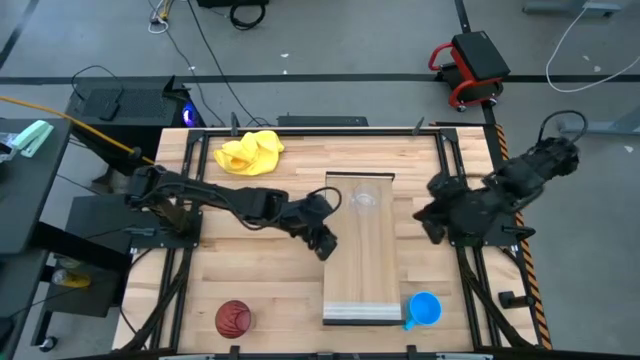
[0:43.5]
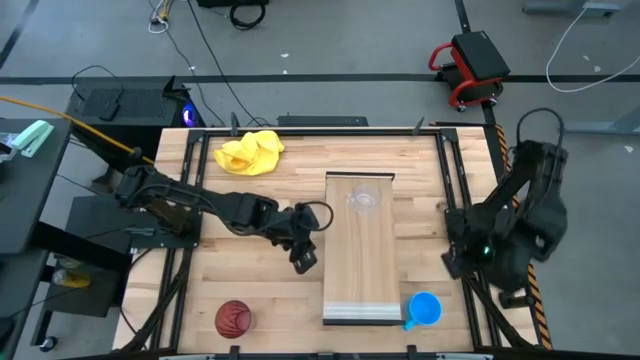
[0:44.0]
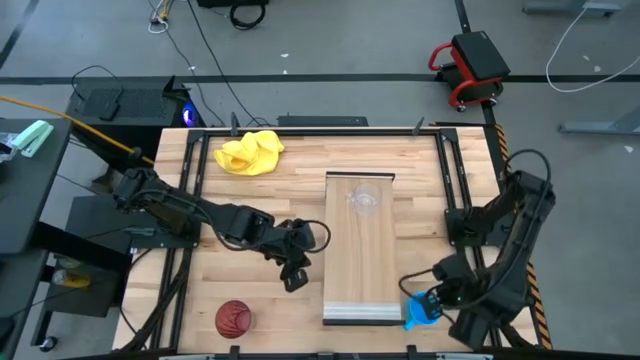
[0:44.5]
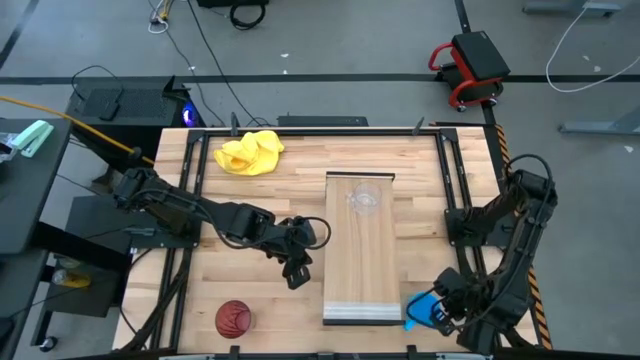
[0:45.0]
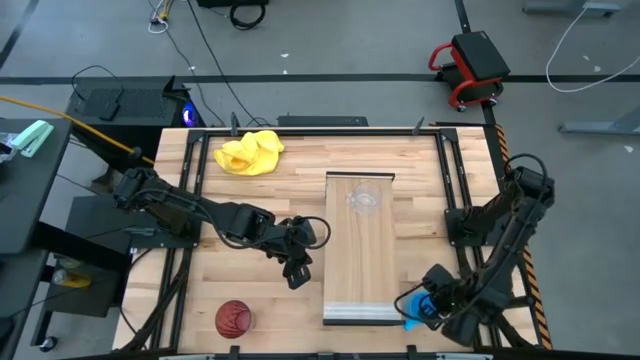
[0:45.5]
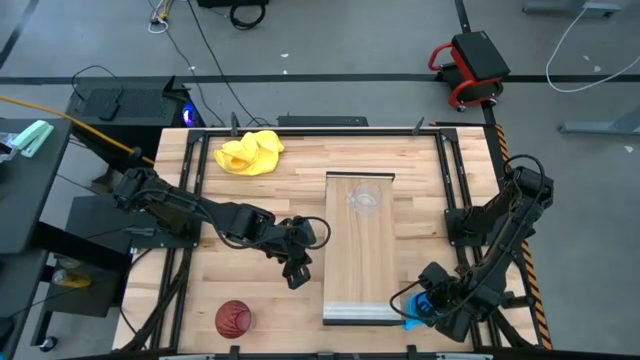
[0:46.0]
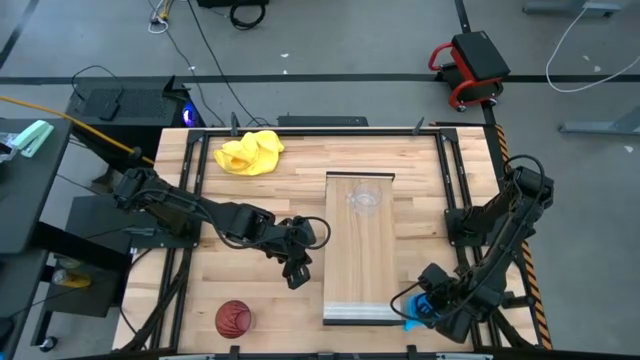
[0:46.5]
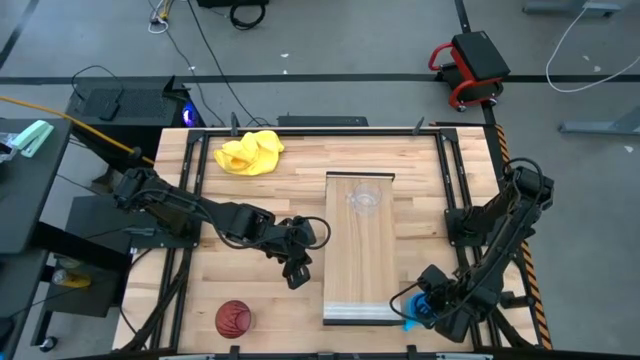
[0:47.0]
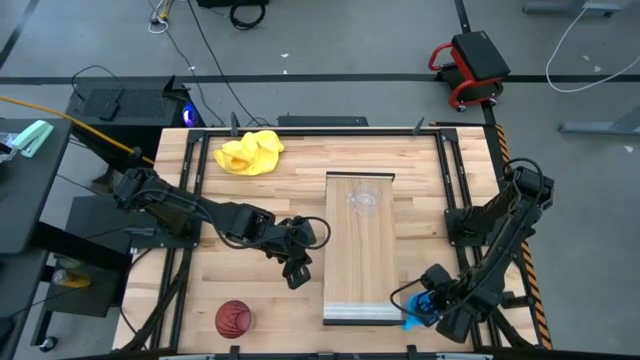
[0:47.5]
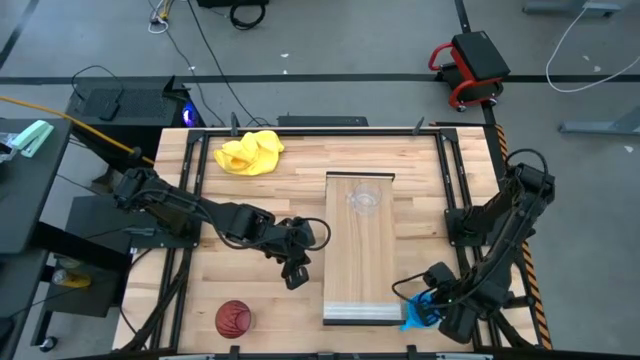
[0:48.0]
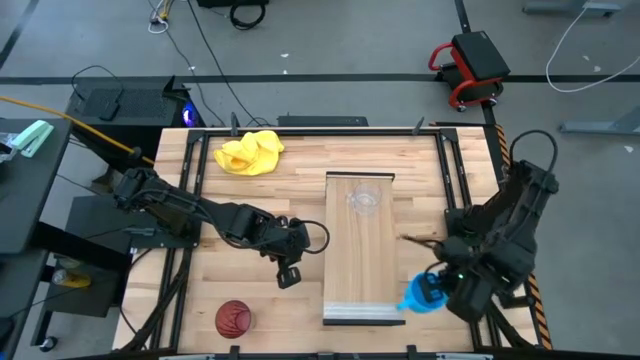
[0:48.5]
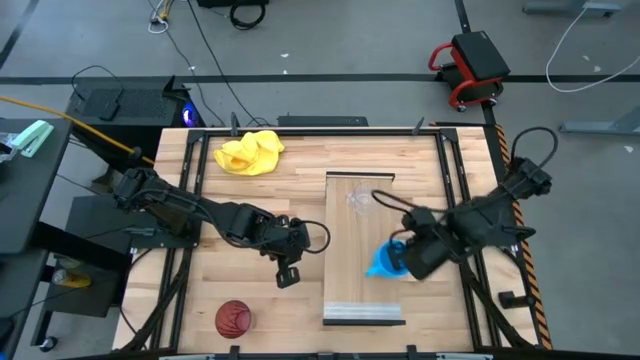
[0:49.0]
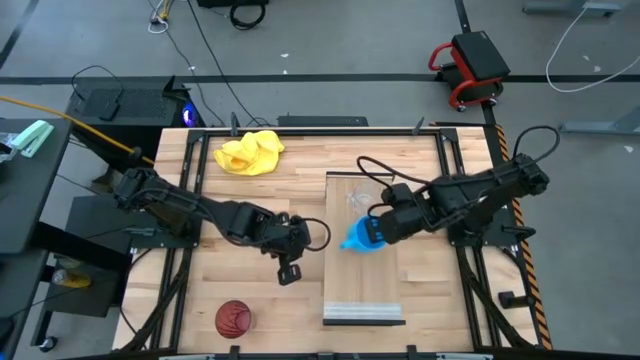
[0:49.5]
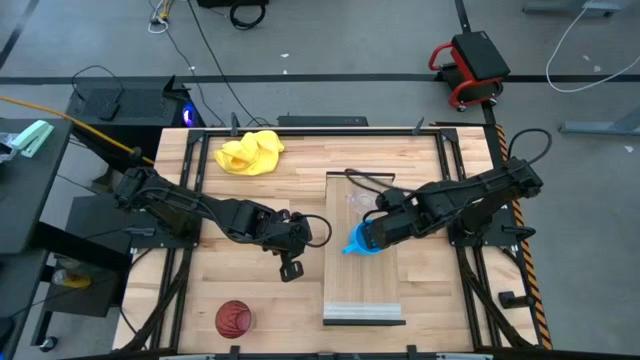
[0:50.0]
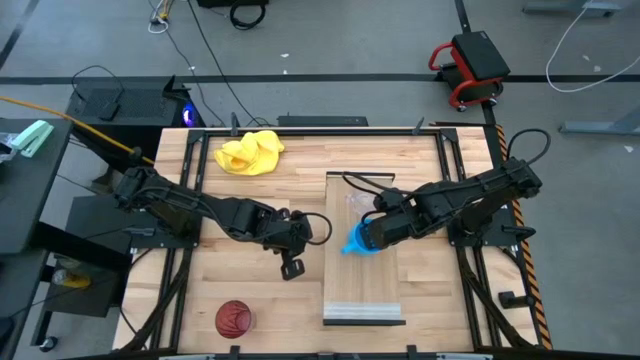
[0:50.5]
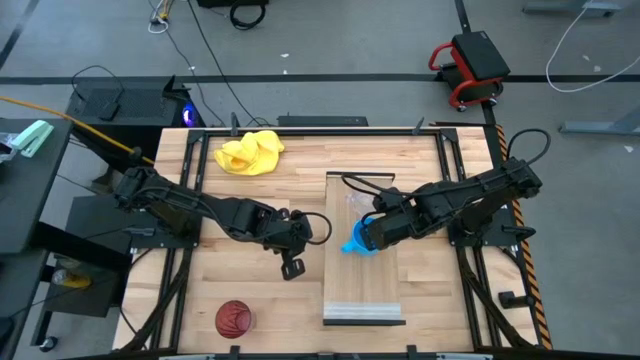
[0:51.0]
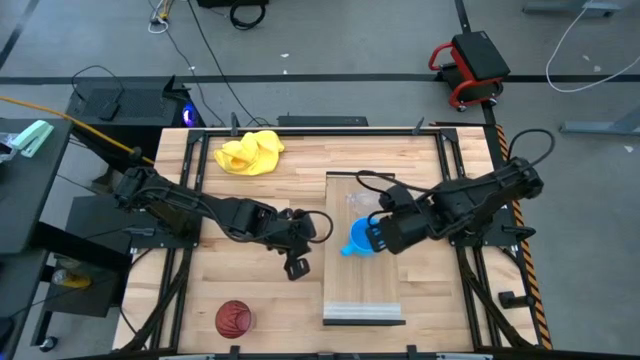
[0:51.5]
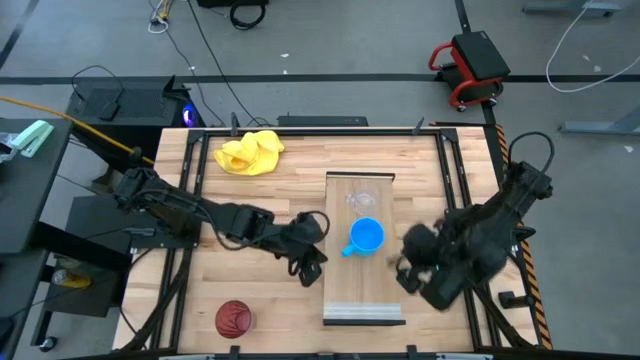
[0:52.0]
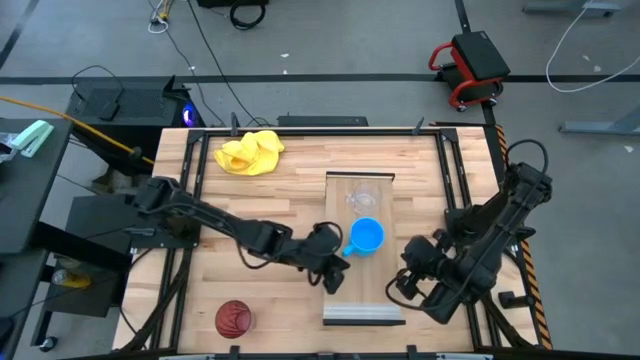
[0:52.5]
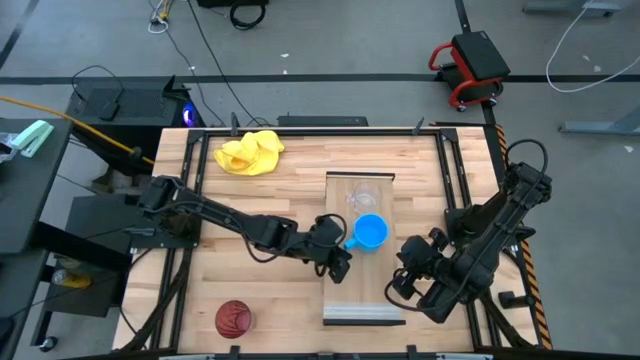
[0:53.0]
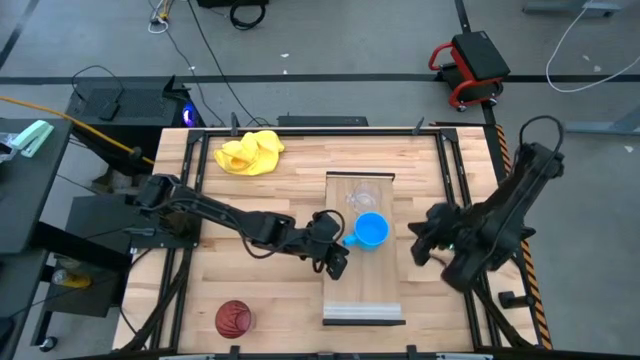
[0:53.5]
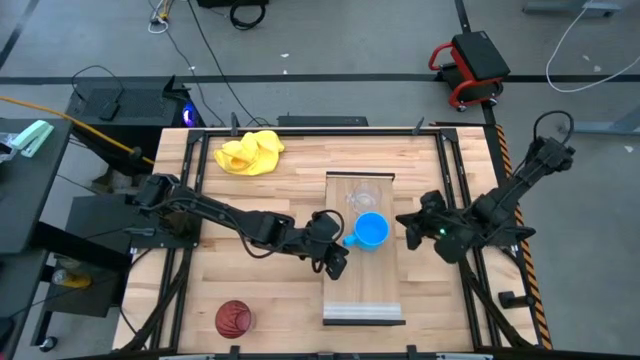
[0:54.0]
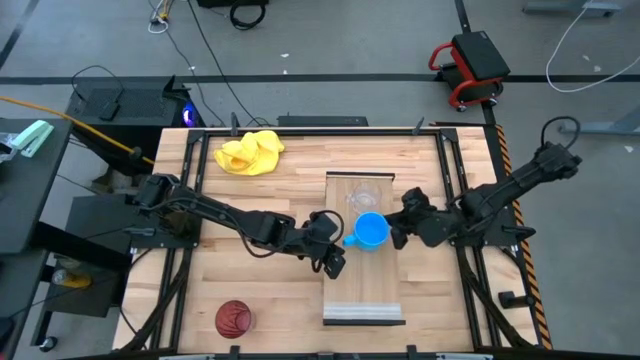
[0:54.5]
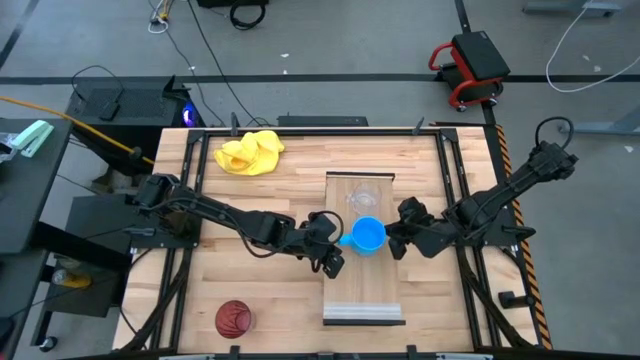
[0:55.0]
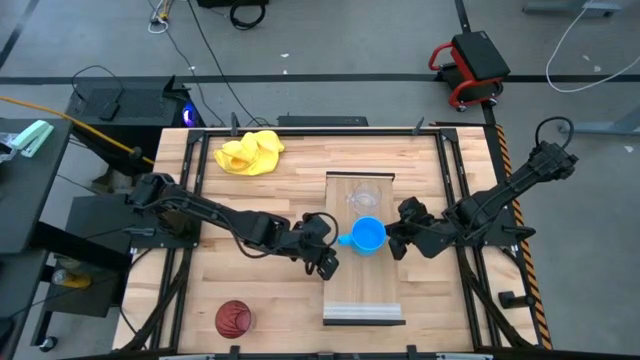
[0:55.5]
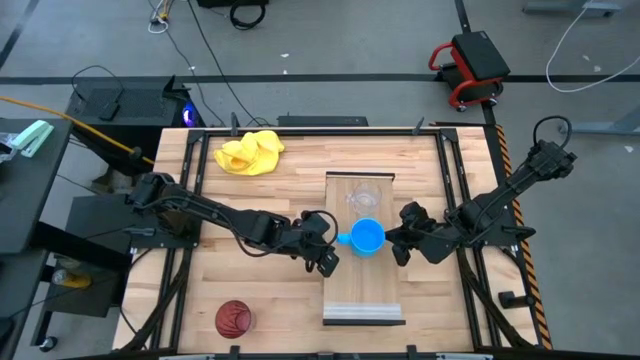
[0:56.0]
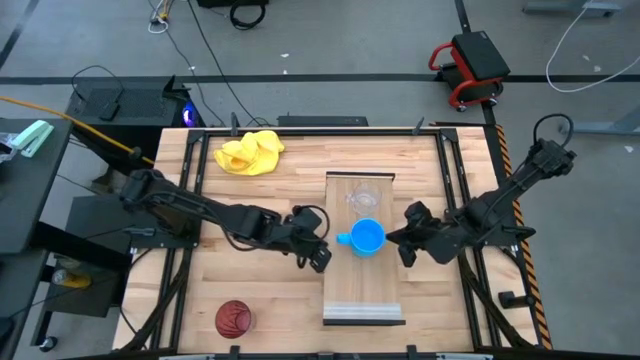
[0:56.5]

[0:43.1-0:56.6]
Task: Stack small to large cups/mugs on shelf
Put the blue mug on the shelf

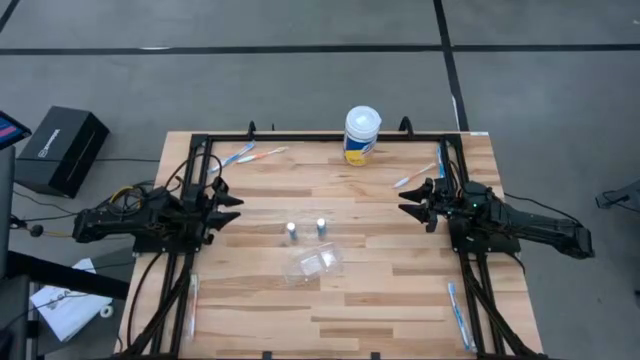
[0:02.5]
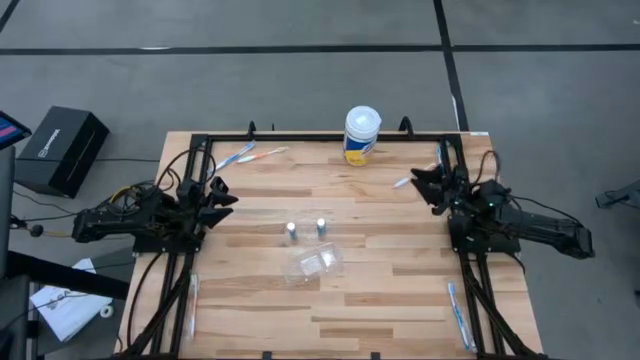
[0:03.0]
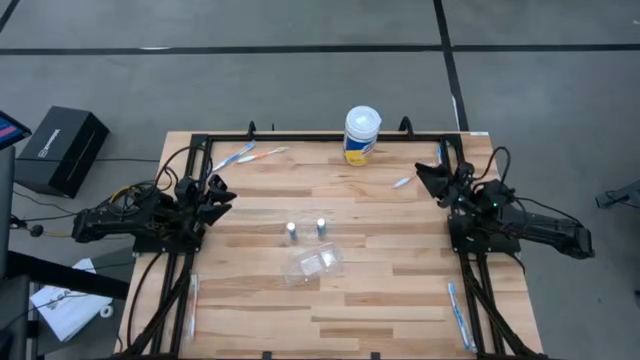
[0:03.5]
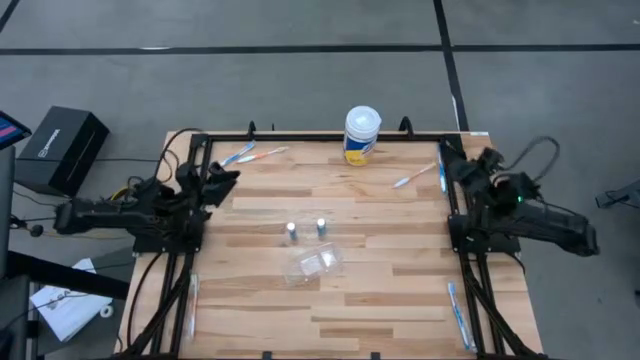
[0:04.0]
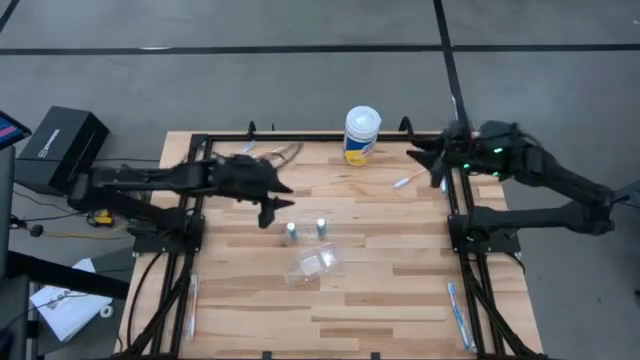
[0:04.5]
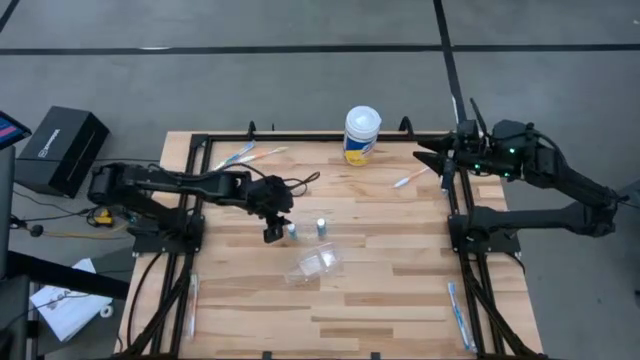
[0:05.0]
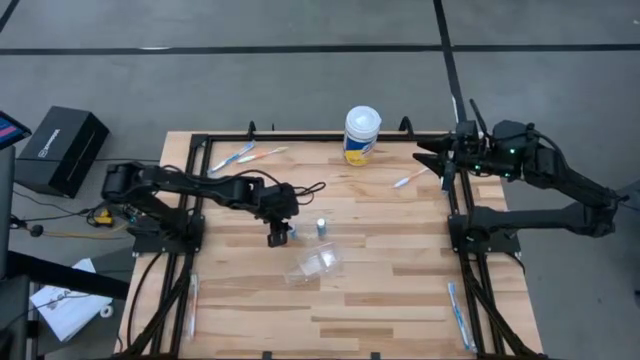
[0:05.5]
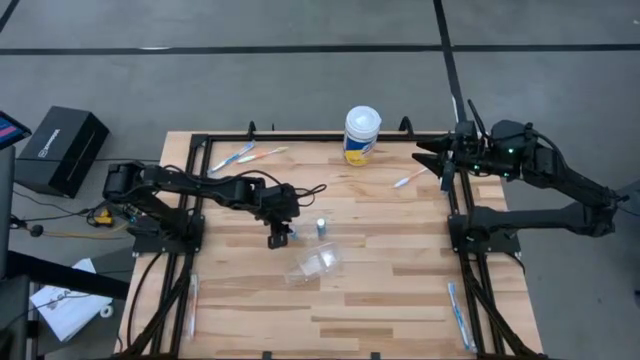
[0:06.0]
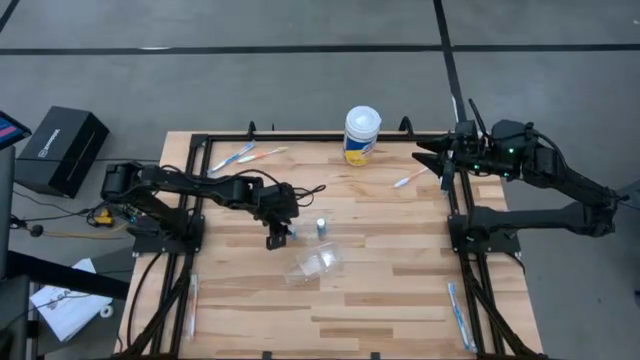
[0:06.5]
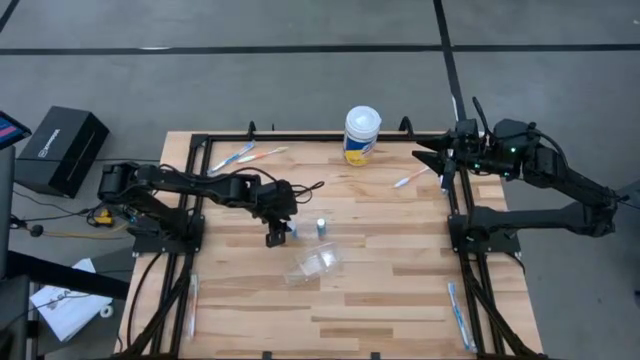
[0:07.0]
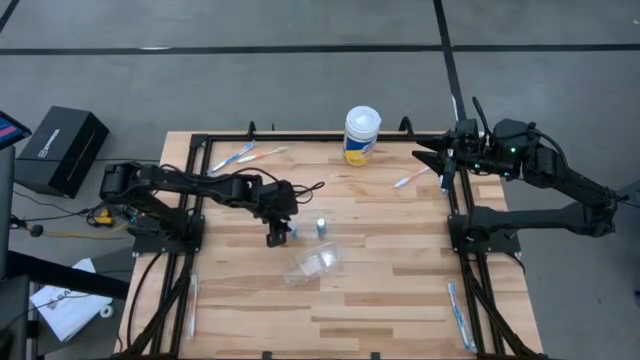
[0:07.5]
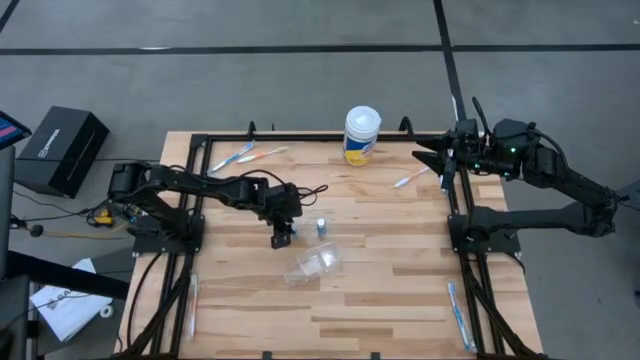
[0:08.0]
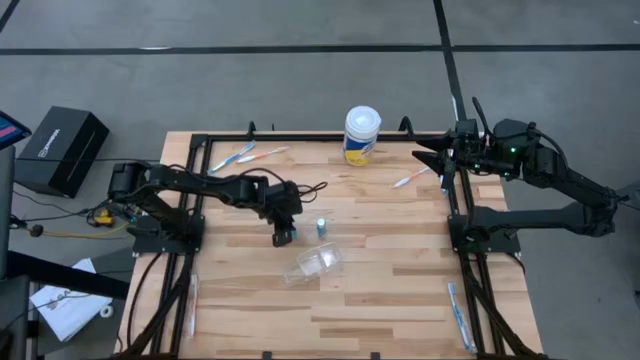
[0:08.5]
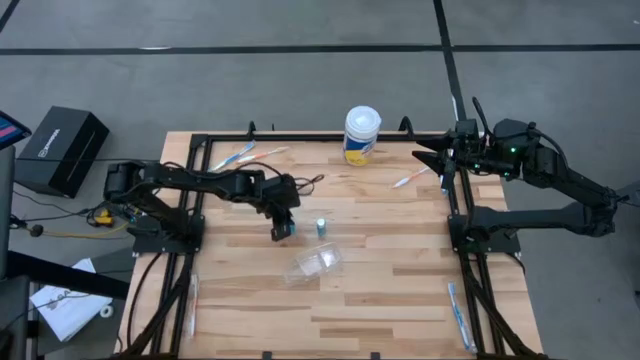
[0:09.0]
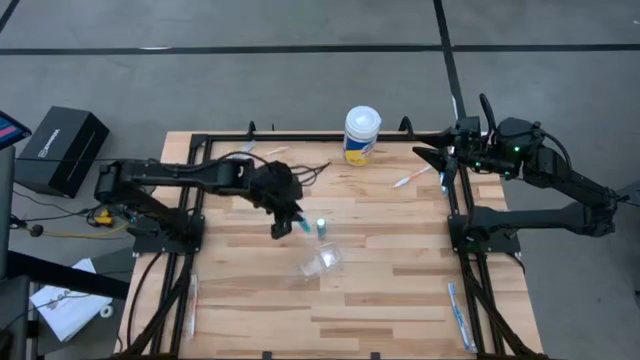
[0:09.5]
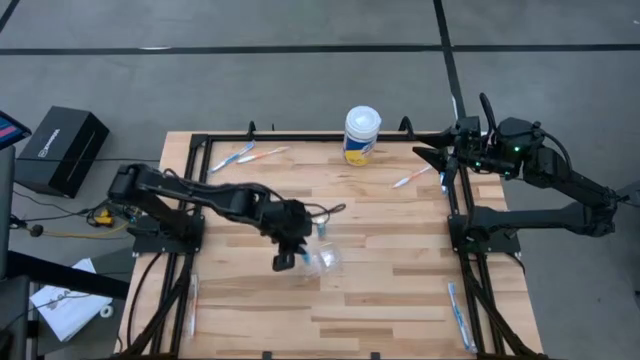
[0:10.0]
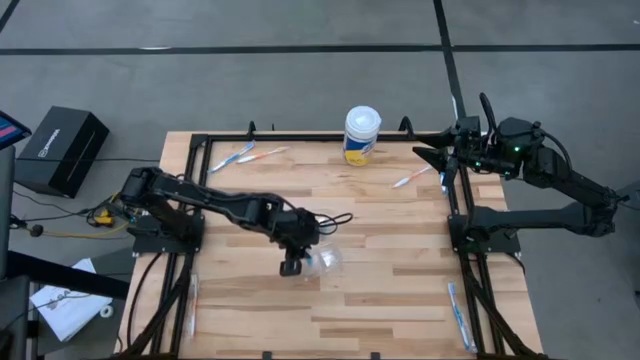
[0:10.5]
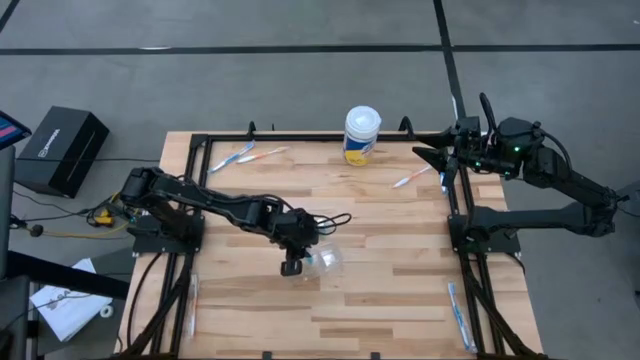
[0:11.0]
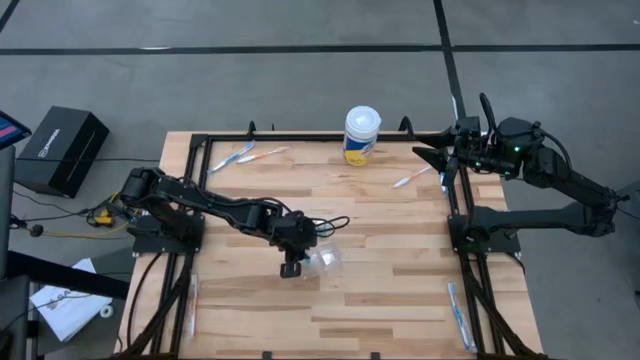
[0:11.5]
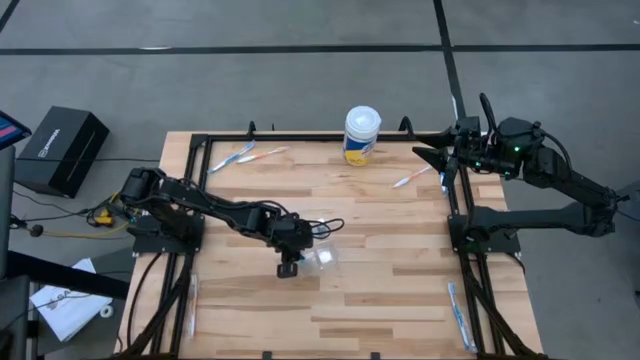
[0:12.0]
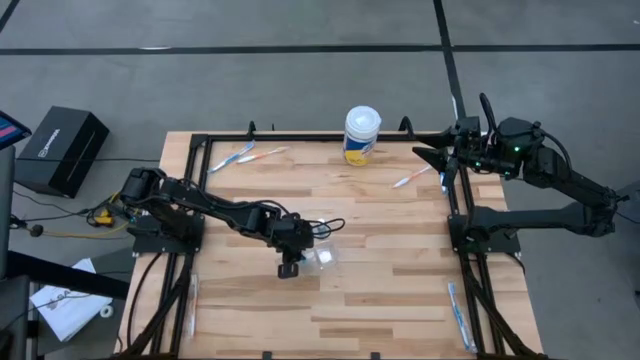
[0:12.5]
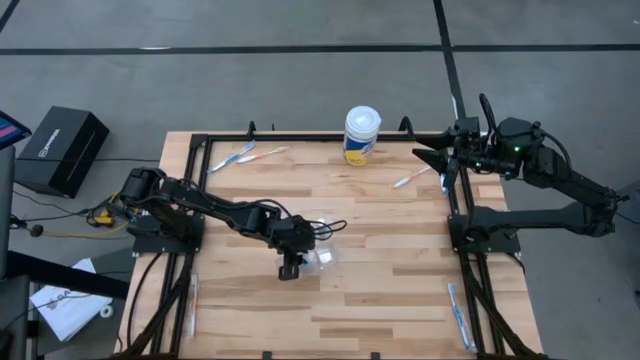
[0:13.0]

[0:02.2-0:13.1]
Task: Pick & Place toothbrushing station
Put the left blue mouthwash into the transparent organizer
